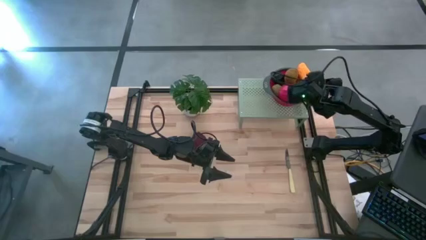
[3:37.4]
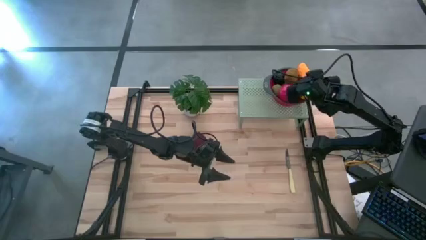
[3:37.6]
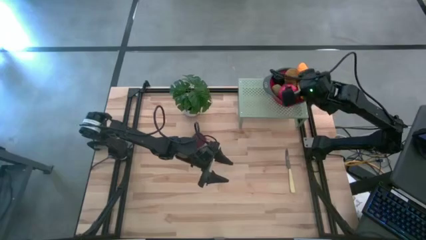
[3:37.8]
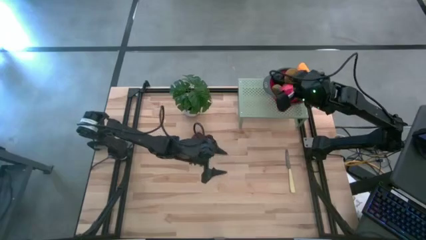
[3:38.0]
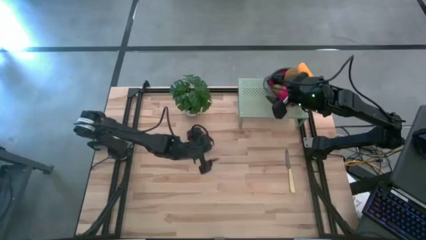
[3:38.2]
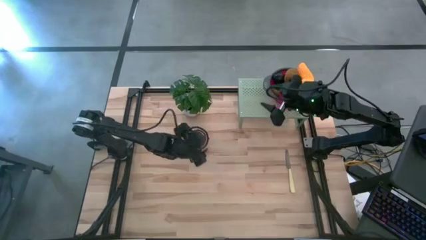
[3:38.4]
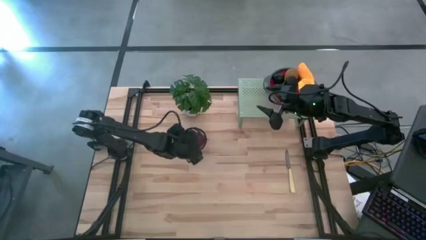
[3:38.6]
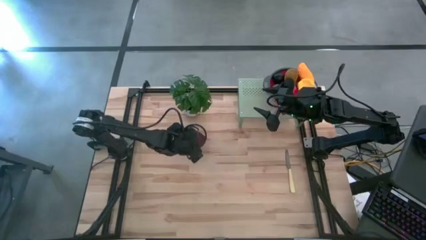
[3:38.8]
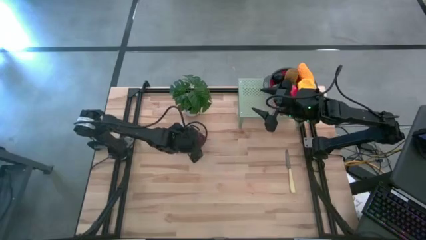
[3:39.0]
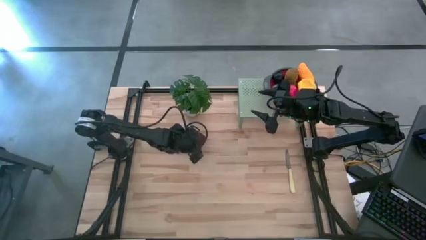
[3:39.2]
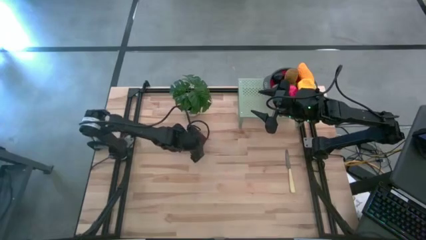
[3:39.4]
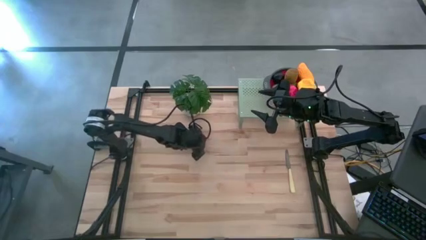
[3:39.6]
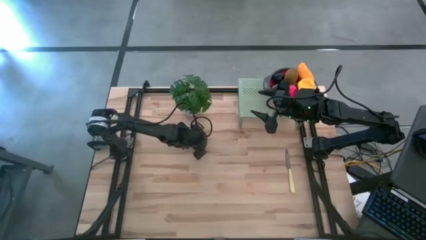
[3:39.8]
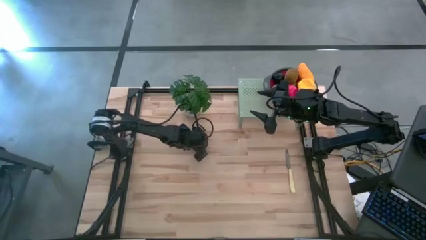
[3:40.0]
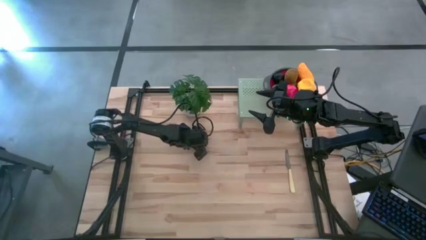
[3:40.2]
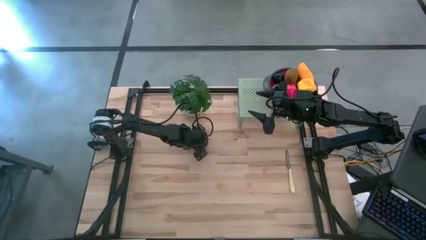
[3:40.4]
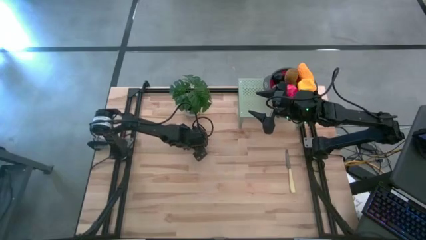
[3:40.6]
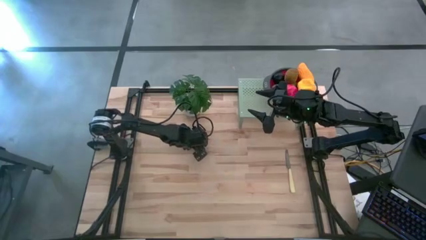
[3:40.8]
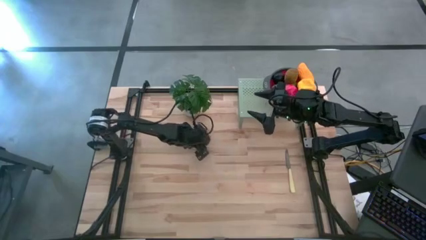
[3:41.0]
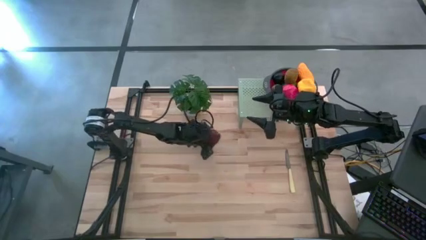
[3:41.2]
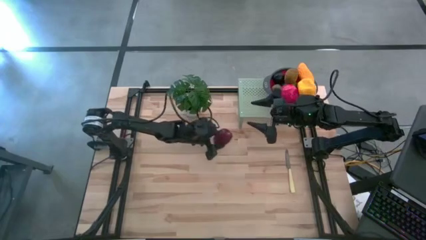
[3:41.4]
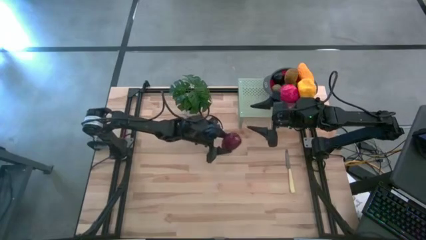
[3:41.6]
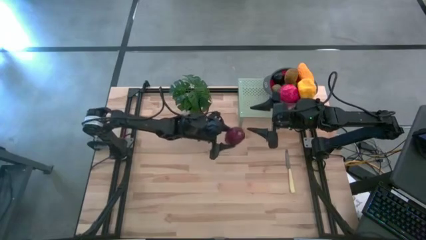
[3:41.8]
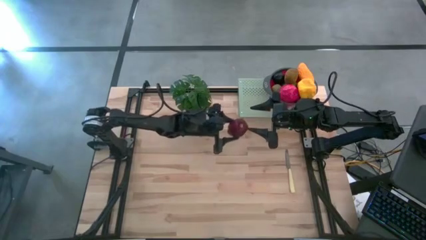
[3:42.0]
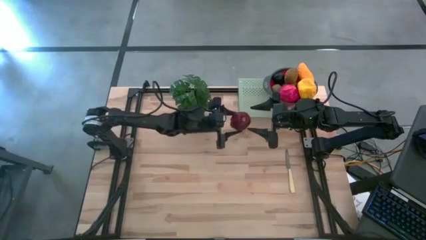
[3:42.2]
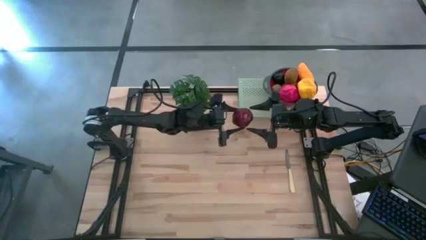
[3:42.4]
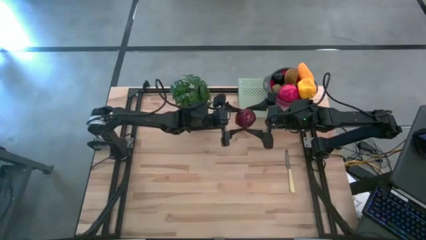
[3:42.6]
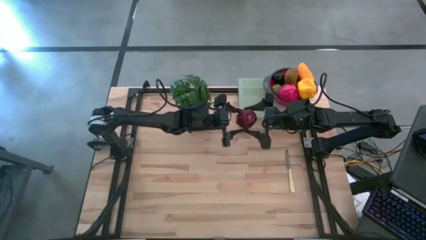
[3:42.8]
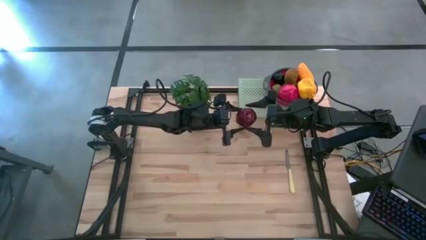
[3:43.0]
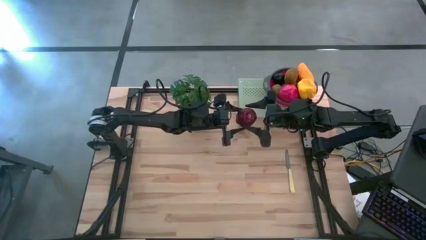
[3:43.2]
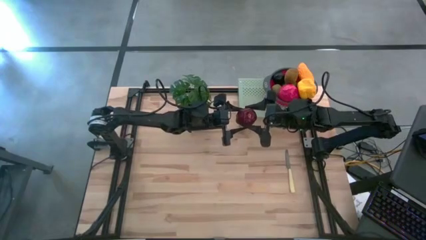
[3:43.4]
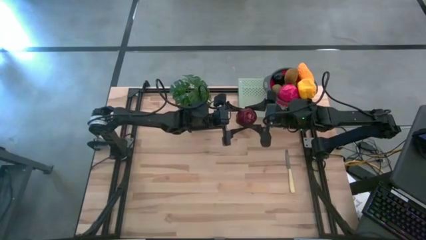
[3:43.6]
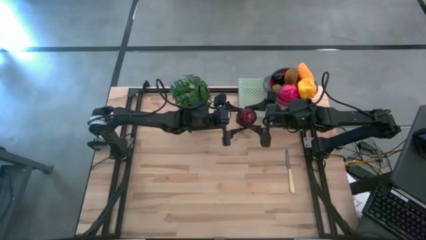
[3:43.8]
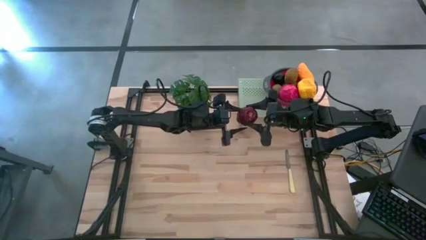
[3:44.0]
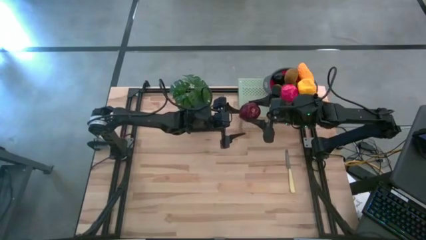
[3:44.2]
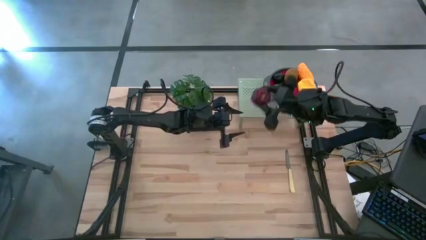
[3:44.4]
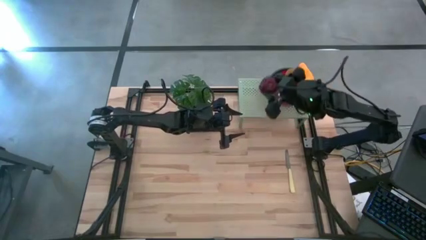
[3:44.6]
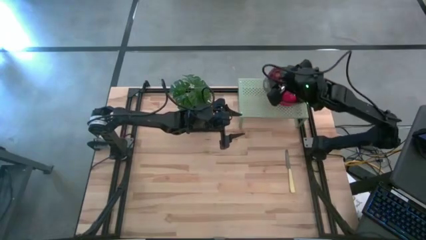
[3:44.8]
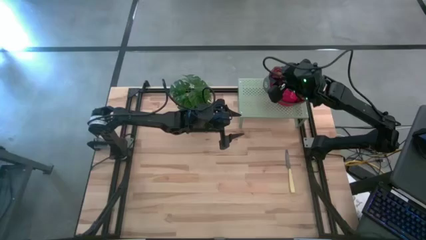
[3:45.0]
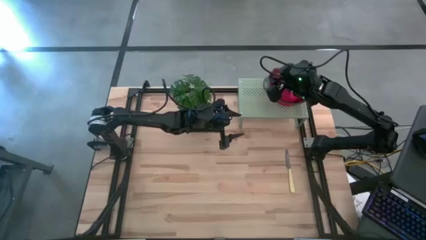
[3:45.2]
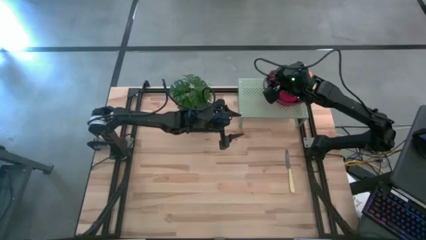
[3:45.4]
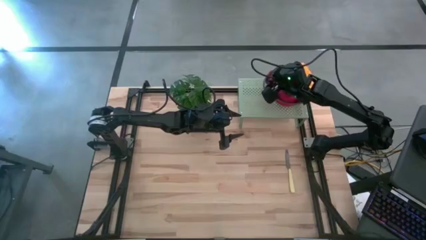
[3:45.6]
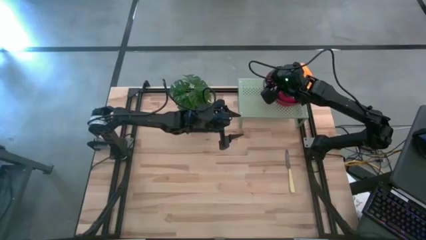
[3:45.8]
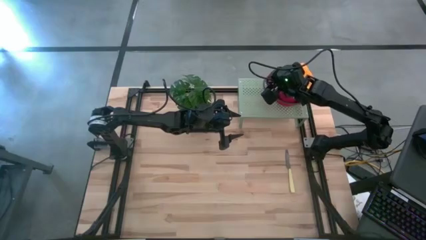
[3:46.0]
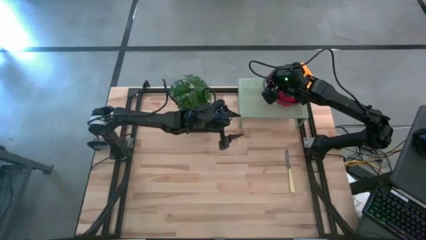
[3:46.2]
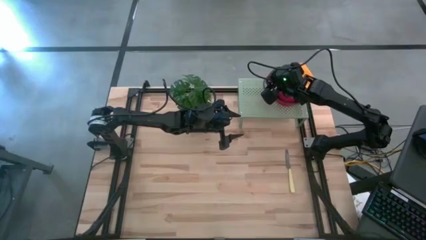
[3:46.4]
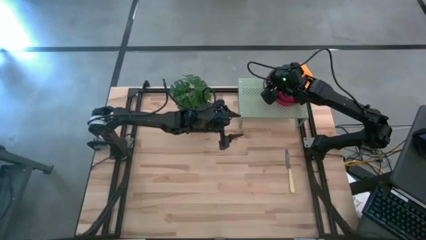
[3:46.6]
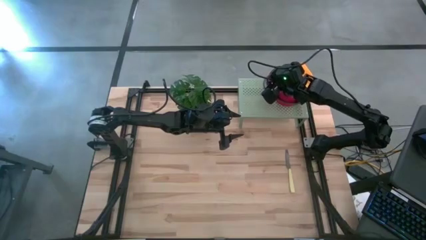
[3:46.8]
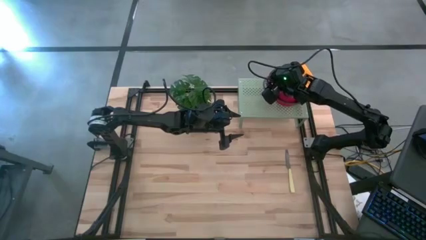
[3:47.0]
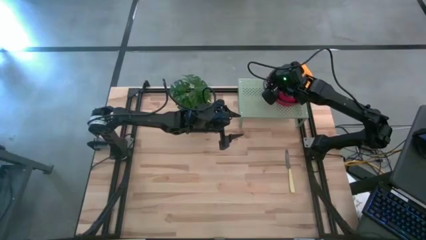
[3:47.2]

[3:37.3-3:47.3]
Task: Pick & Place Fruit
Put the dark red apple into the red strainer bowl on the shelf

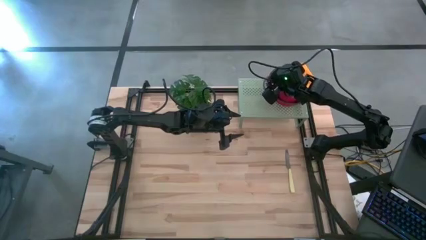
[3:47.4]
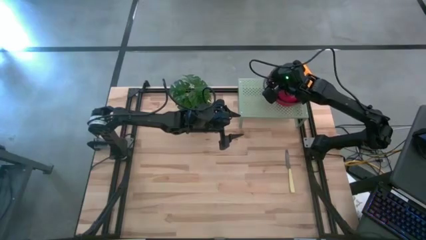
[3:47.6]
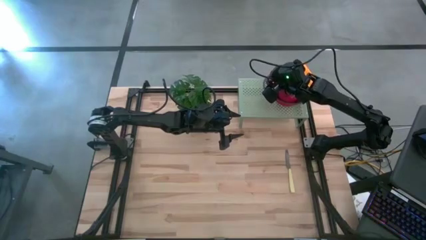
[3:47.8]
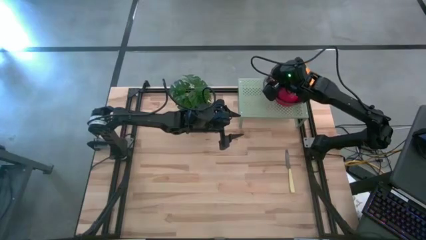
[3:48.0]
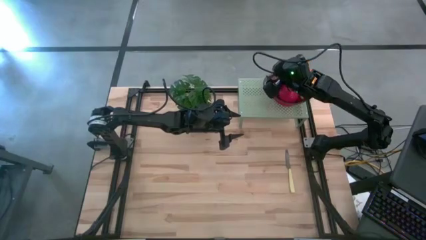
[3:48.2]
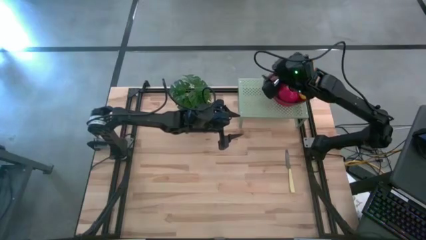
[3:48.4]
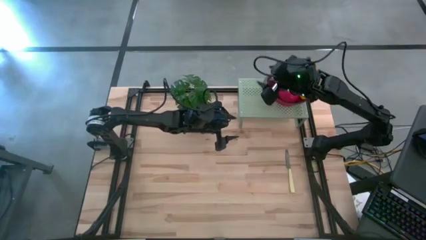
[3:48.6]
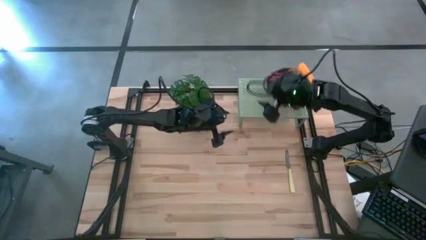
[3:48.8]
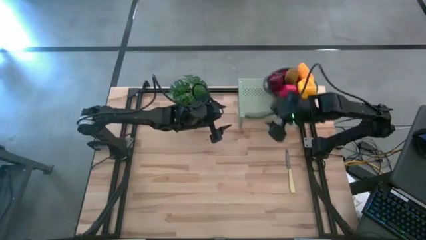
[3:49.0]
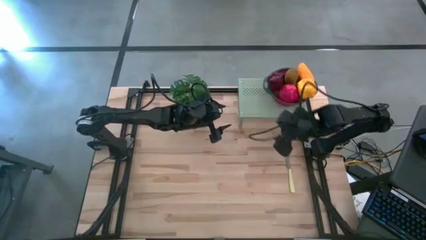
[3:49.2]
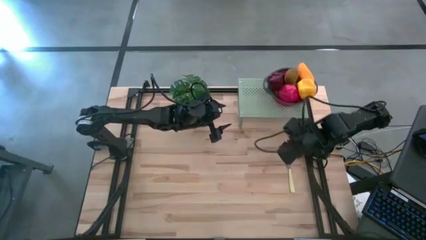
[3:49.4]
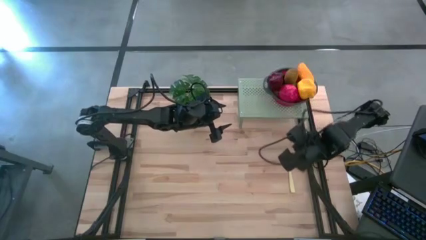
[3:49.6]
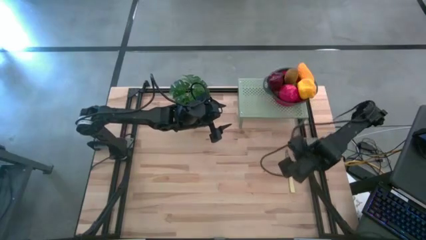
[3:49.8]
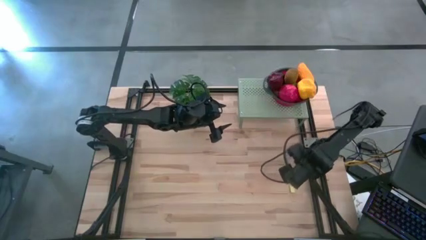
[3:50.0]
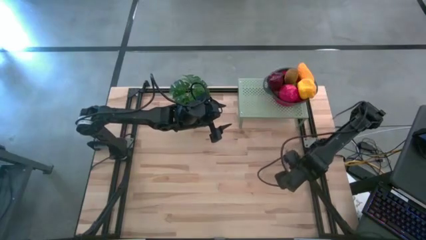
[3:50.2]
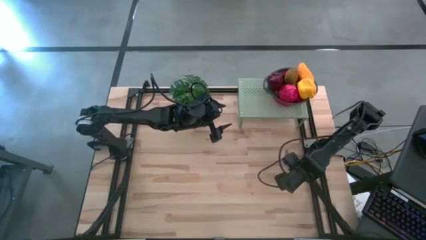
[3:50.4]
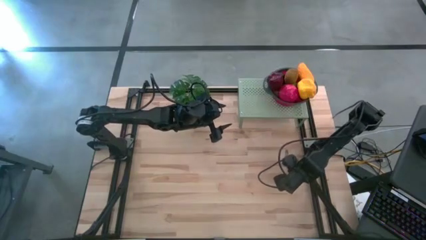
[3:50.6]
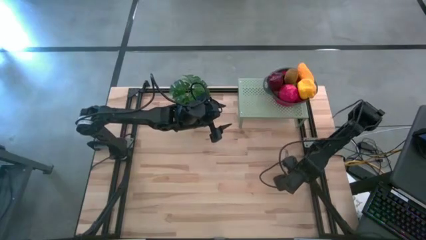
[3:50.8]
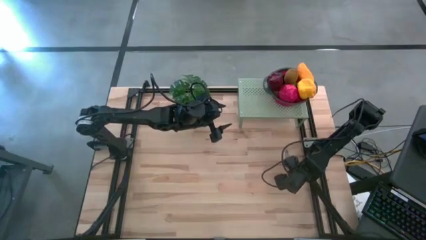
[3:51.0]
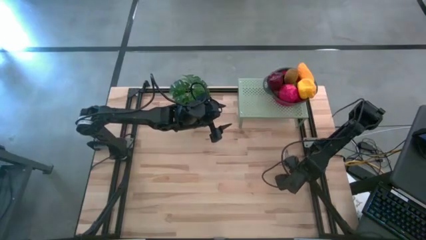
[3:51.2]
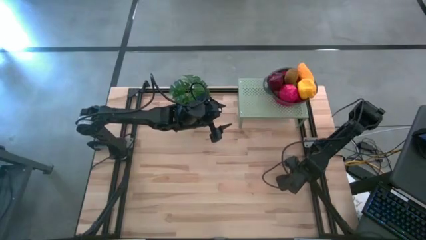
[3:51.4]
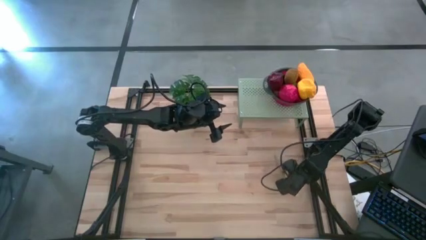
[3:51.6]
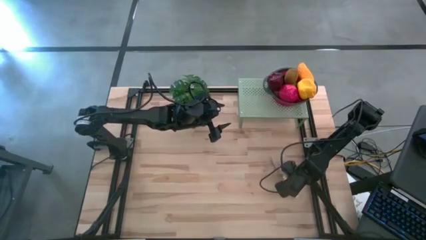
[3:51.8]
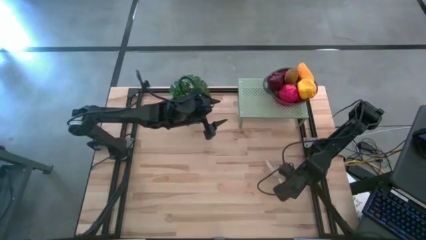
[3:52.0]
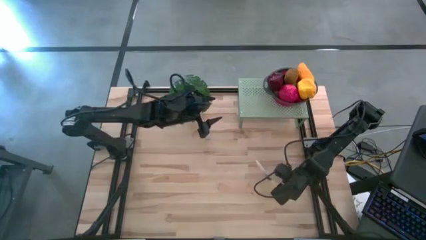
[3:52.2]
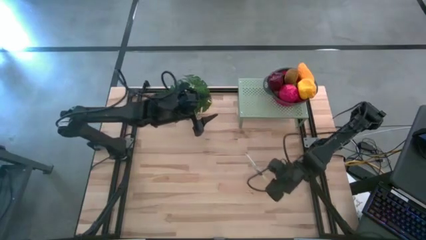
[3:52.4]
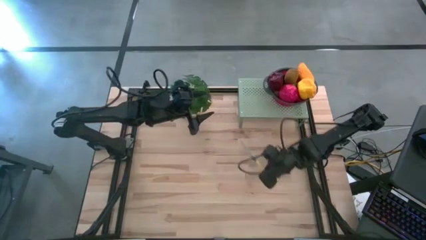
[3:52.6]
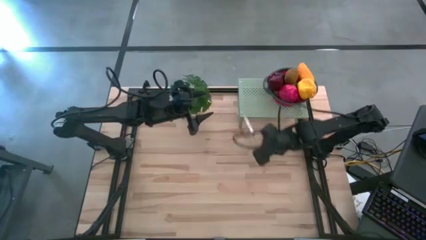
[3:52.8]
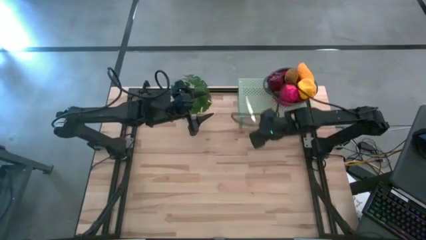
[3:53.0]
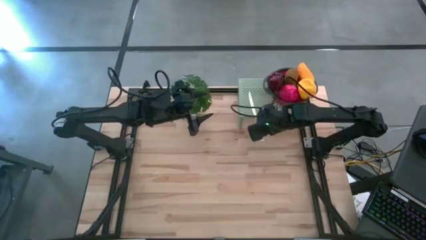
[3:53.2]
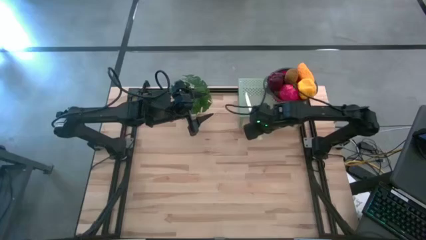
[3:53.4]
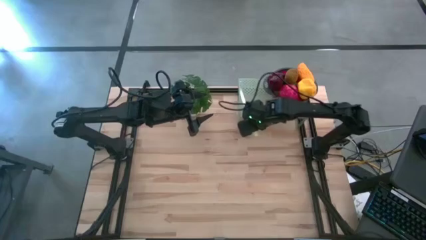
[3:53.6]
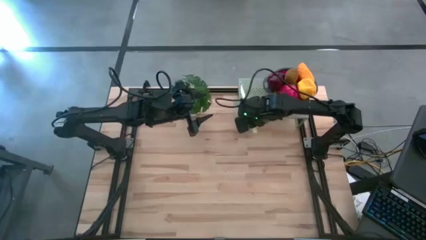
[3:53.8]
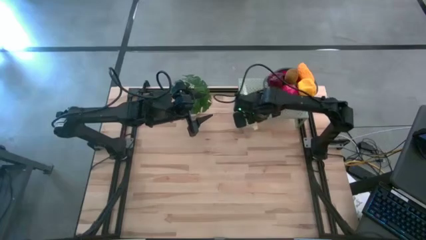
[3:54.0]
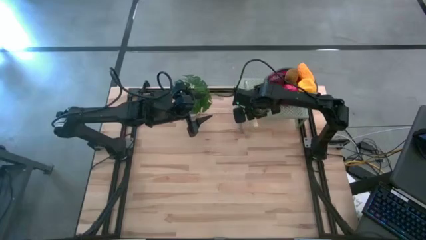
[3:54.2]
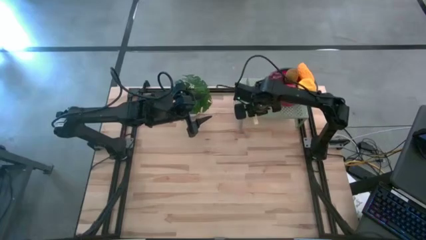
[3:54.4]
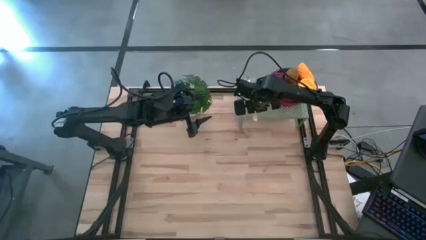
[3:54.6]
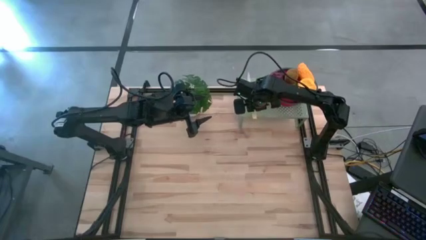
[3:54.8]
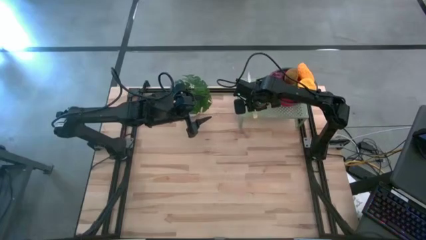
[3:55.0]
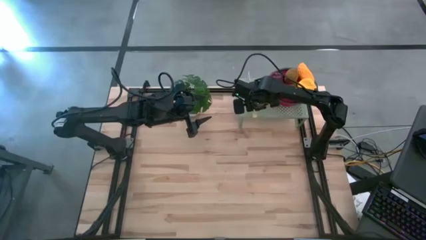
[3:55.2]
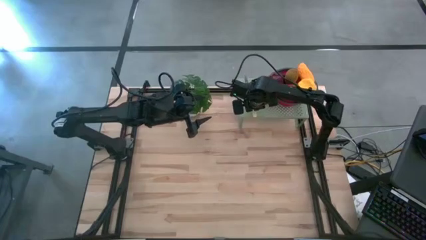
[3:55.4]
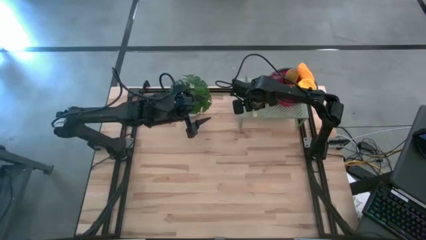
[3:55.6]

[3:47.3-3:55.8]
Put the yellow knife on the shelf
